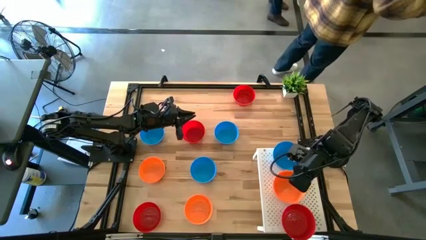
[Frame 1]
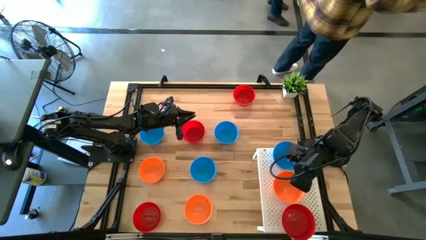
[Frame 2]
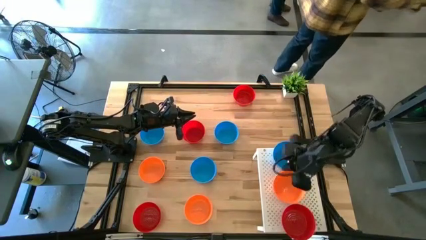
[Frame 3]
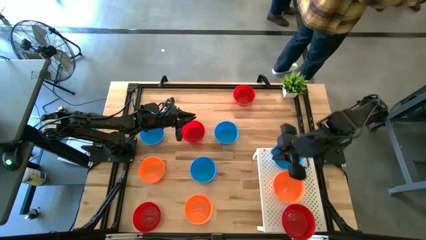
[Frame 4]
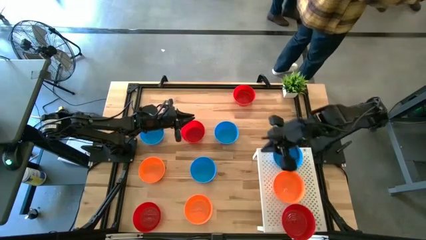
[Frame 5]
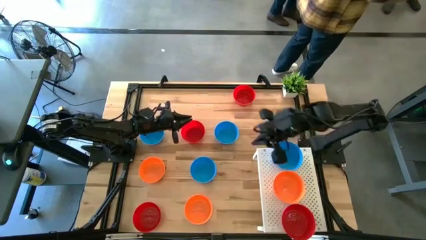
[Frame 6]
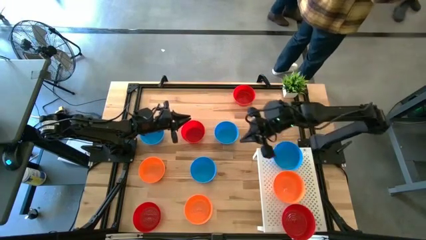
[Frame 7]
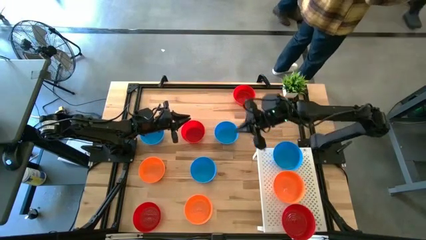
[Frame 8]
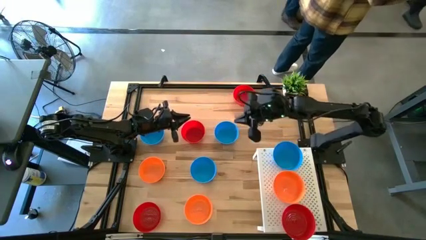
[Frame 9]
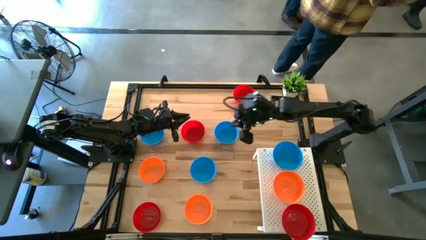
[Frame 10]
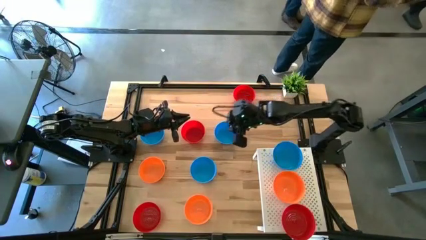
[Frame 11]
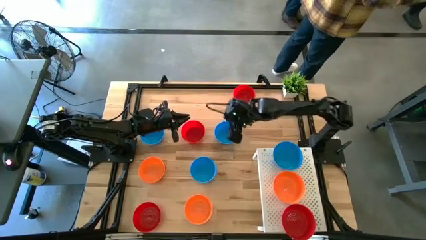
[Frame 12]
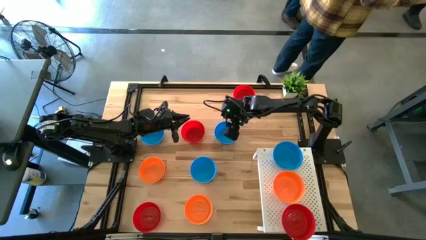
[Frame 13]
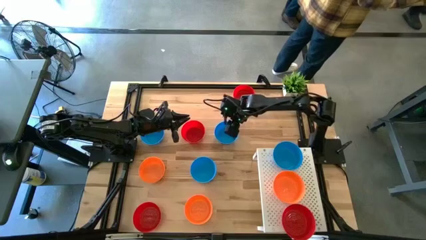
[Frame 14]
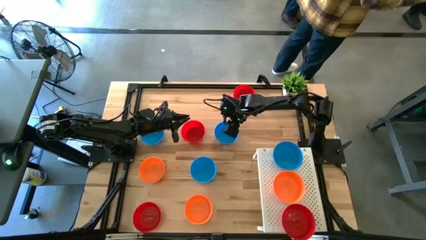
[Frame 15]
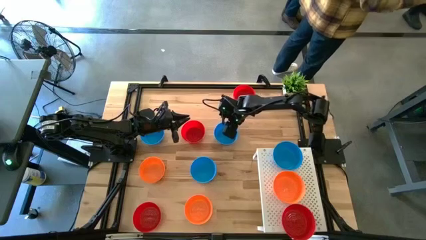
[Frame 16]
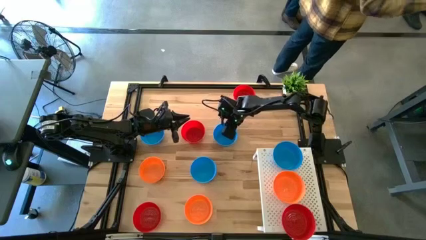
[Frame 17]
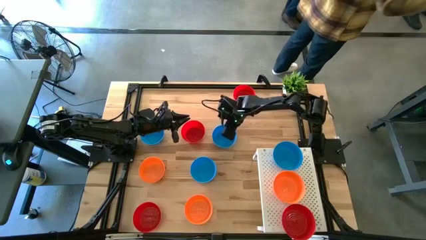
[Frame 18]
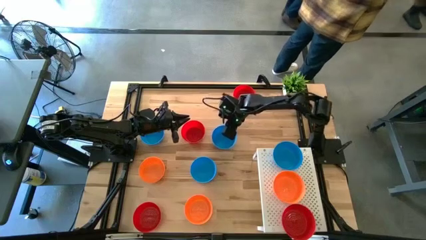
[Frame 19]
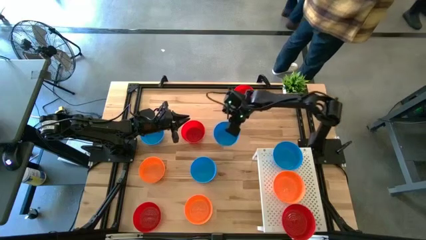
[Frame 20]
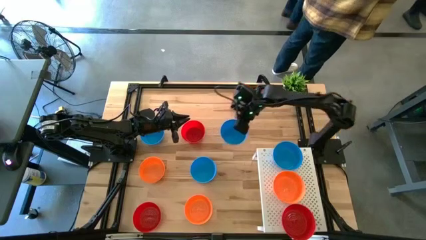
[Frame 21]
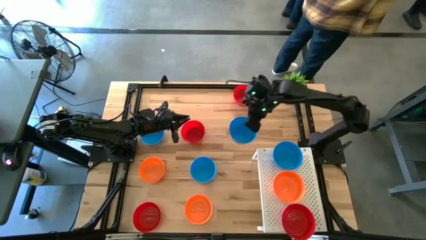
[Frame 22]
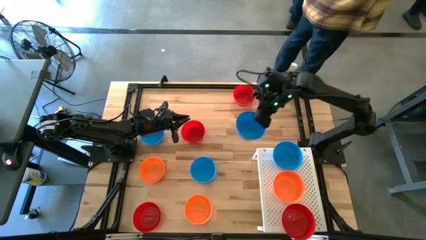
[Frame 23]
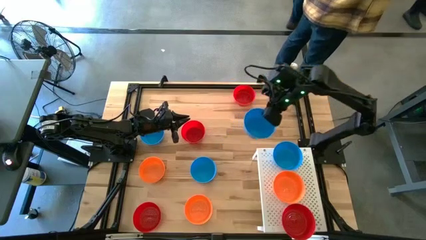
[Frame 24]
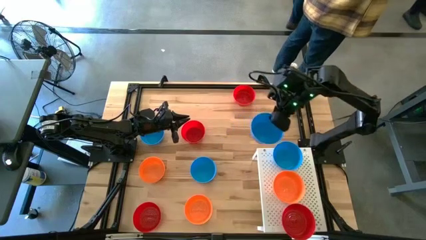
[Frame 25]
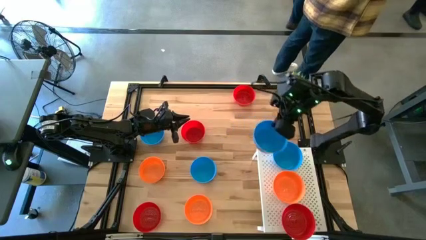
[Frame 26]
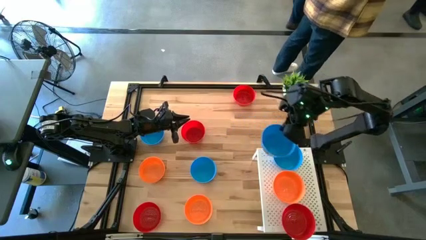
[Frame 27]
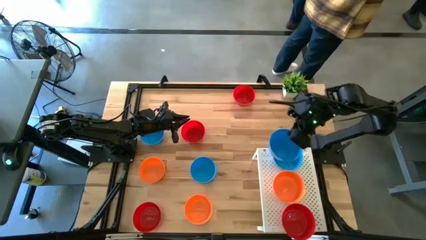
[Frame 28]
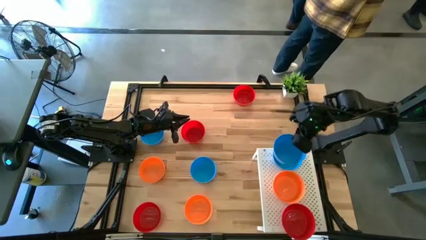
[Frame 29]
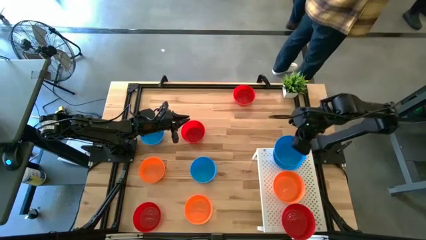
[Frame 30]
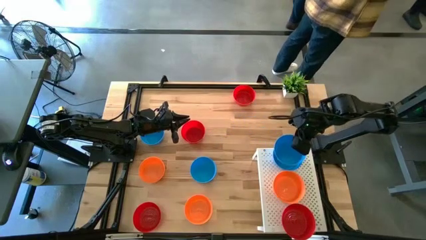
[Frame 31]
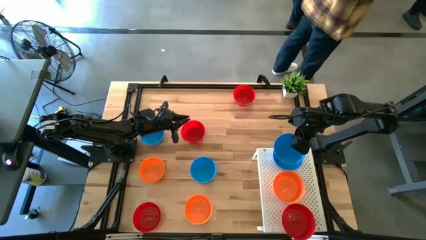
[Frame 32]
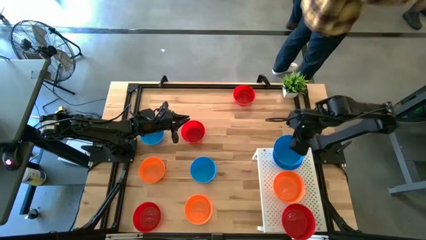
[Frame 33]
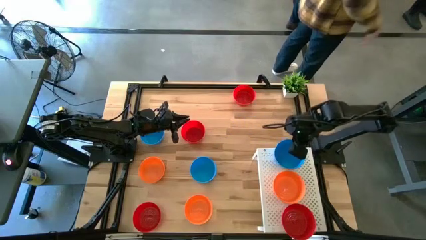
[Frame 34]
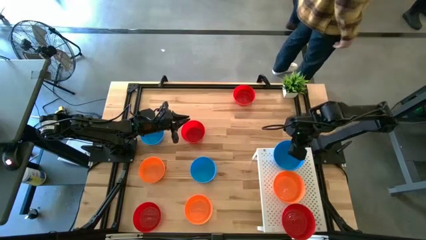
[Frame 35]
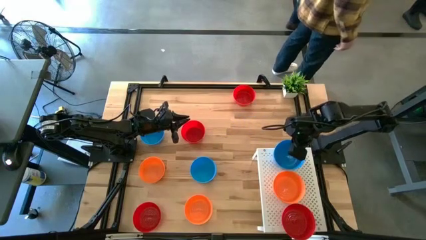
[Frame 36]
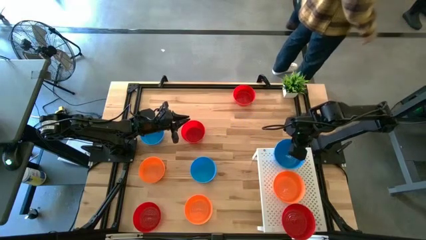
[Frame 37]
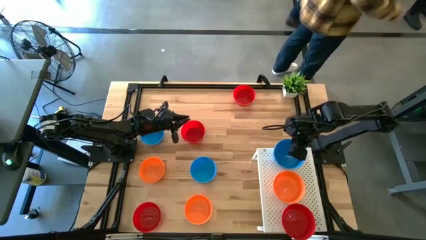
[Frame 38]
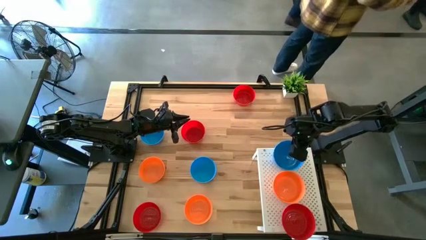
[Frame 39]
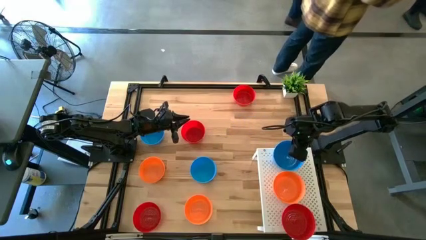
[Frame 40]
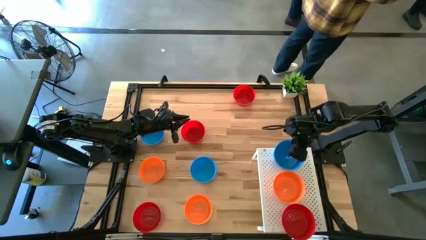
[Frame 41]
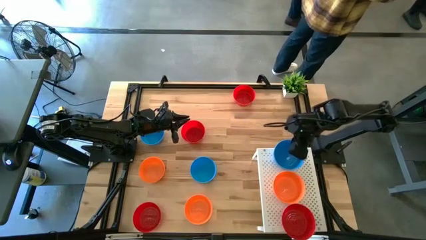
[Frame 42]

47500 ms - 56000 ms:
Task: Pick & Place Mini bowls
Stack the blue bowl on top of the other blue bowl on the shelf

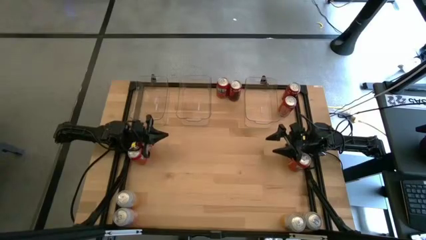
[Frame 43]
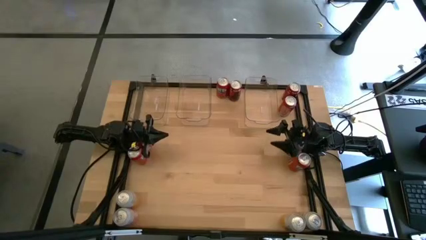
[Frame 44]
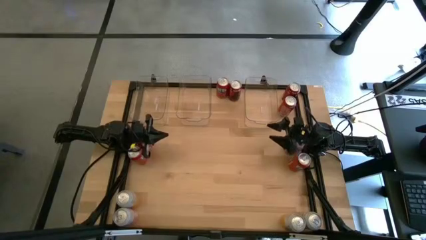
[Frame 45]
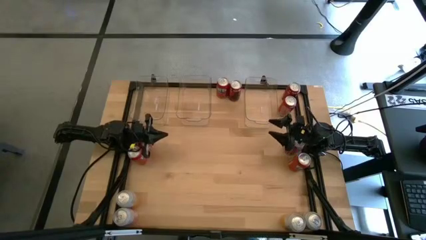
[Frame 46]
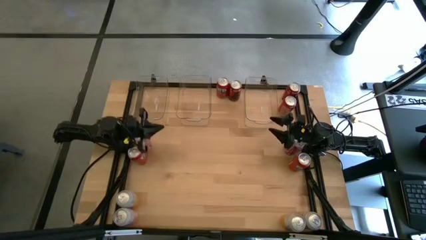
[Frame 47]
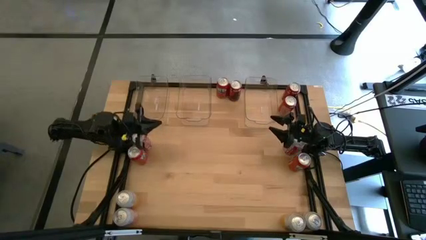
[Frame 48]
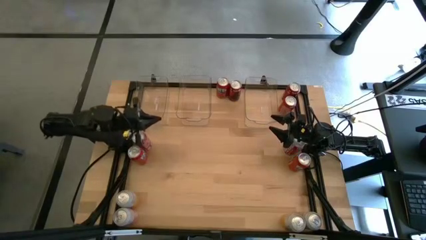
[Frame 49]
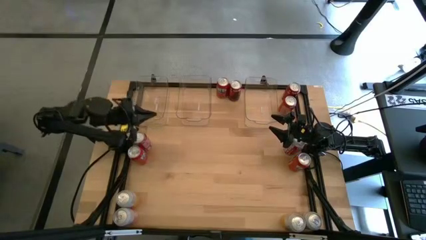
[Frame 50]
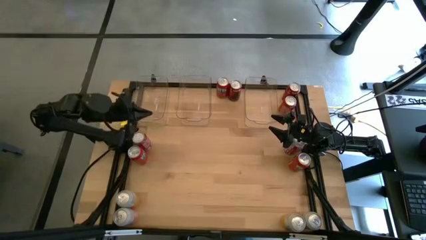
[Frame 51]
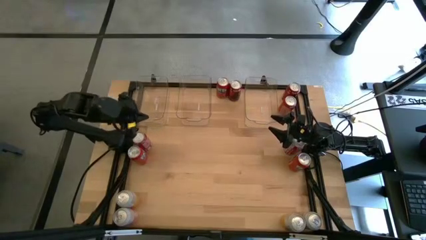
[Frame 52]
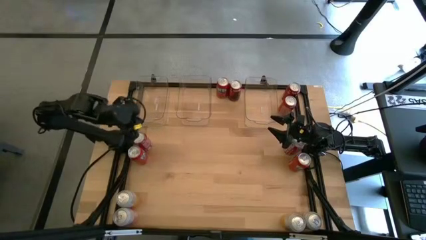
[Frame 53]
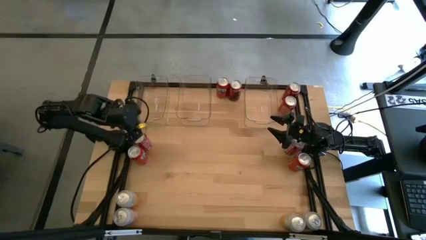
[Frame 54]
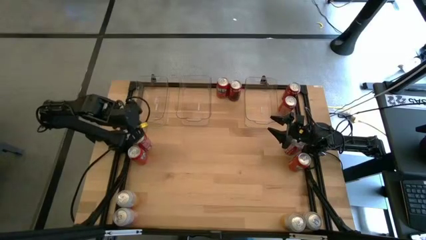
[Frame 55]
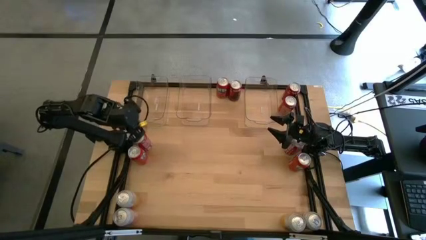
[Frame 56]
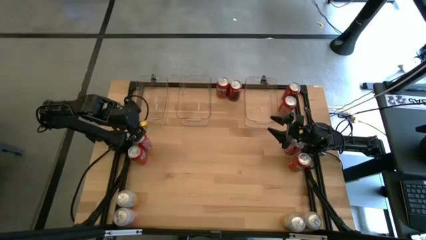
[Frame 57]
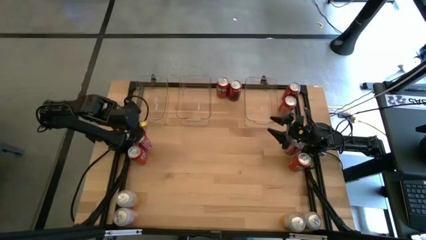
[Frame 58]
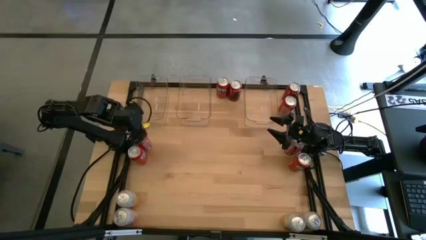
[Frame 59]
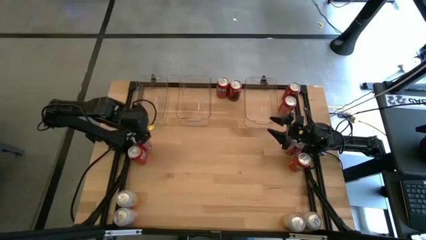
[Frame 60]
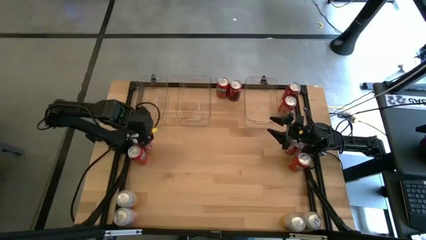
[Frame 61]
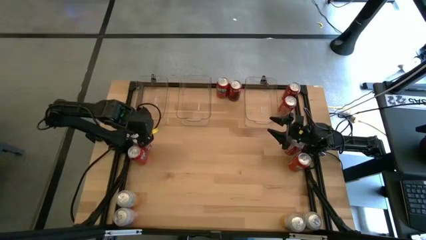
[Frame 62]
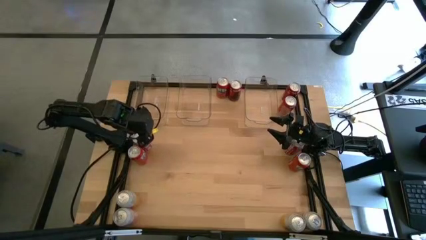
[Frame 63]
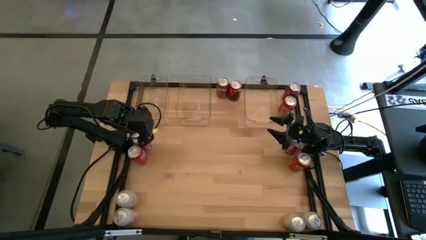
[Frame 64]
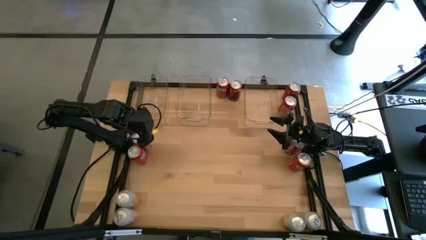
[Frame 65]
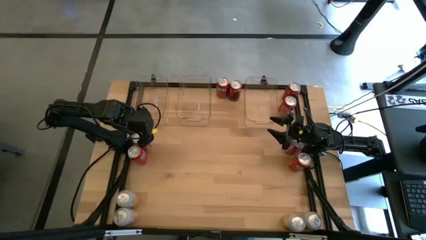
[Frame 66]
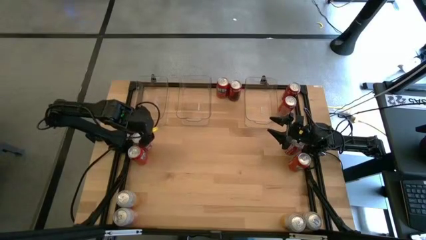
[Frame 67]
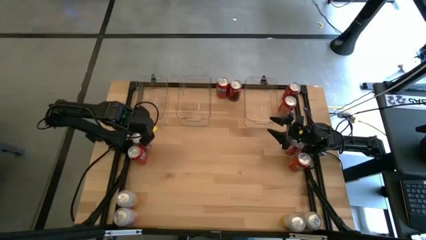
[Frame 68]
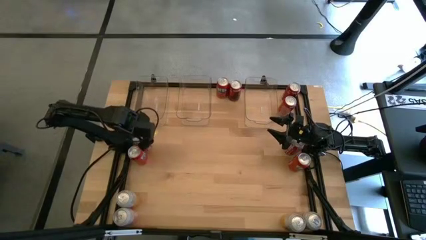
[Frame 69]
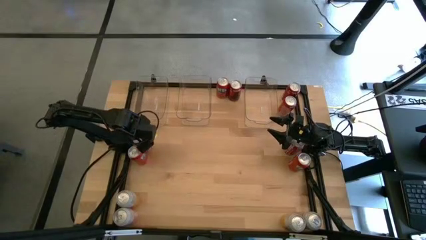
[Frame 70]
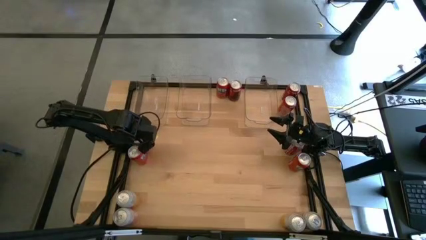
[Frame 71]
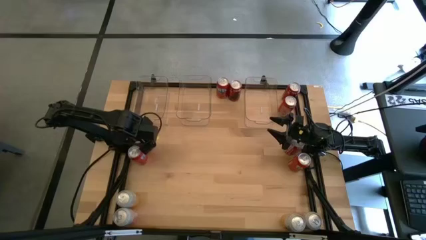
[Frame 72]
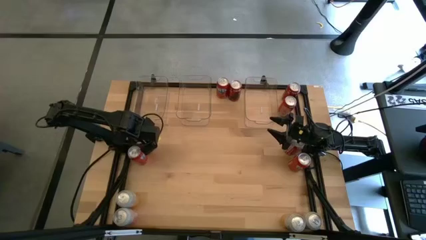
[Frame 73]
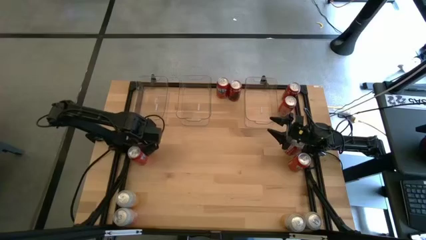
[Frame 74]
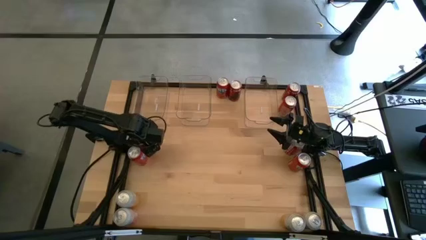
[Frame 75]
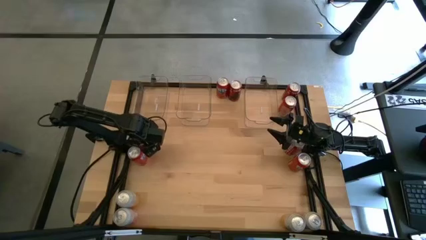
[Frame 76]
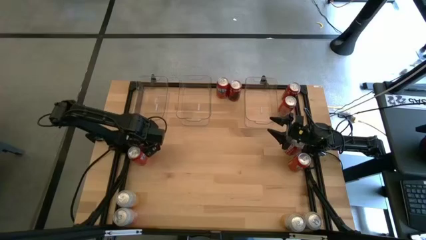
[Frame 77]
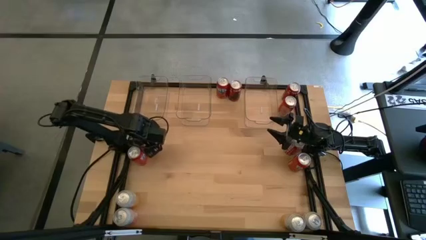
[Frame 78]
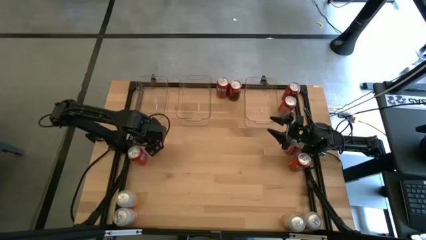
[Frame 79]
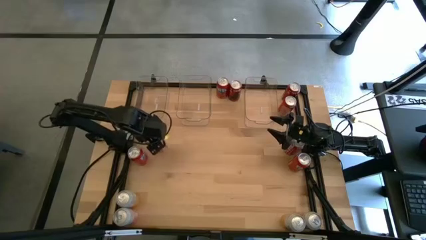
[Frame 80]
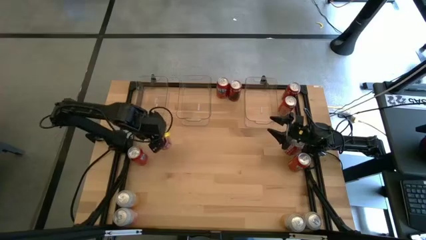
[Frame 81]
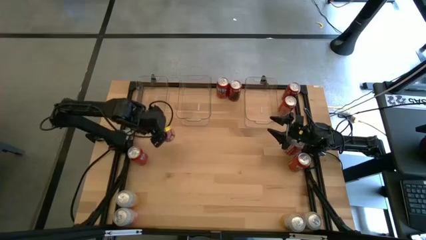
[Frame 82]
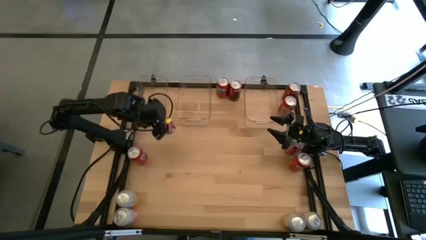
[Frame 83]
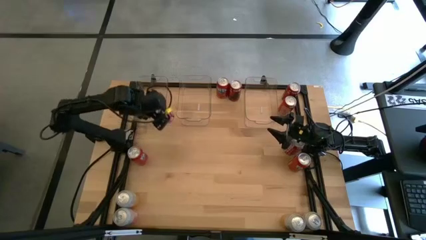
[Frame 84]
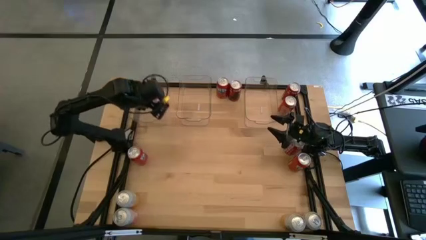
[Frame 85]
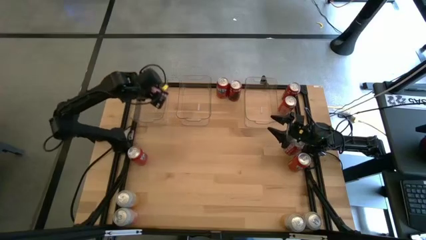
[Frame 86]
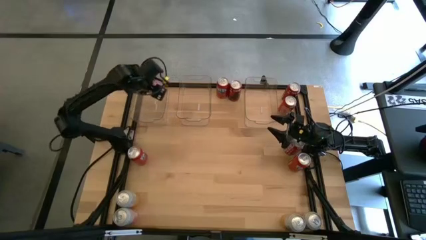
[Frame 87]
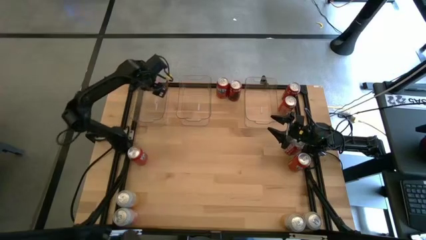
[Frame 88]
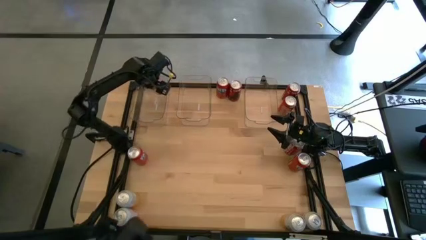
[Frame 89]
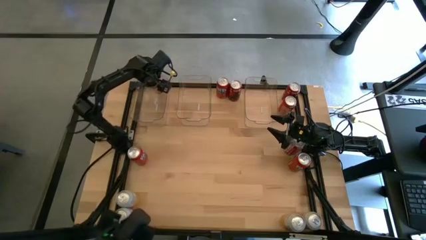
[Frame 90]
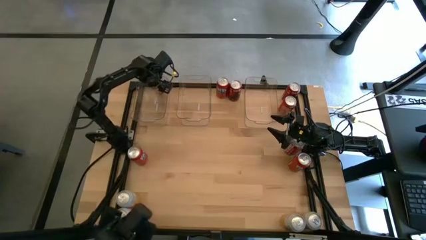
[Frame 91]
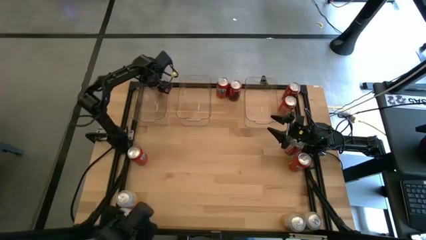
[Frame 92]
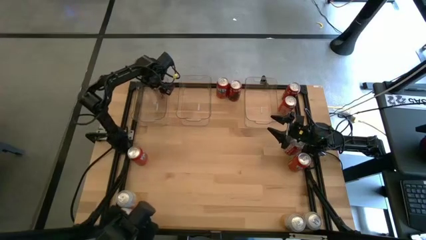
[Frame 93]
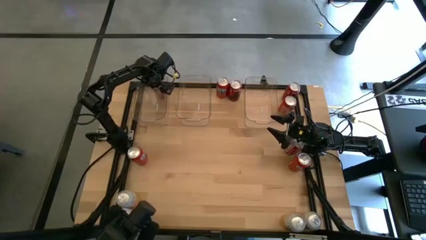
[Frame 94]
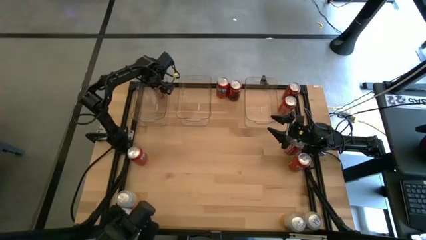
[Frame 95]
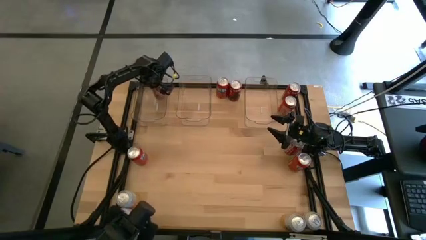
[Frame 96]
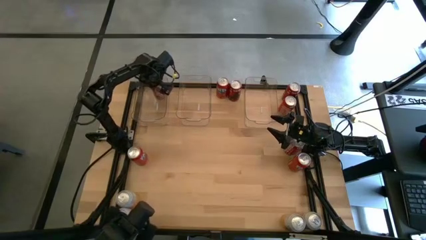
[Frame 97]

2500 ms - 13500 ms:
Task: Sort soda cans
Put the red soda can into the left transparent bin
